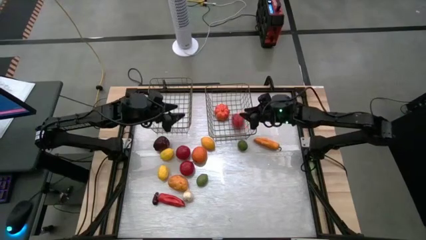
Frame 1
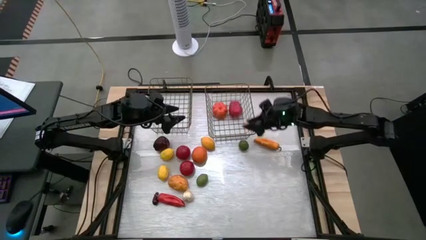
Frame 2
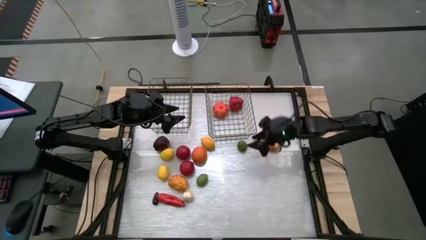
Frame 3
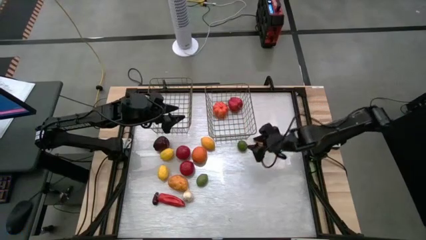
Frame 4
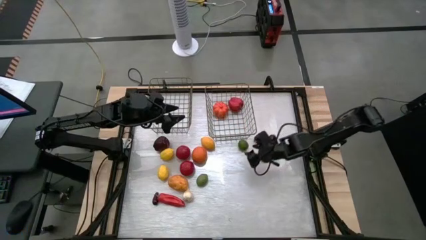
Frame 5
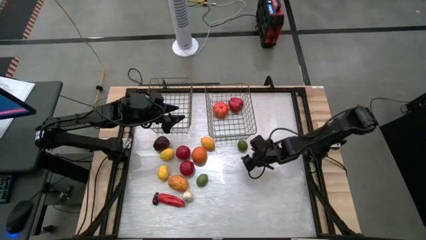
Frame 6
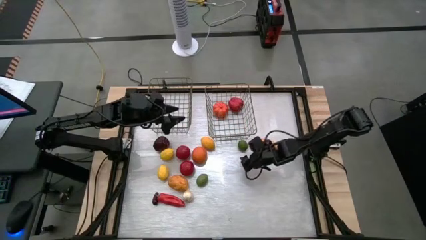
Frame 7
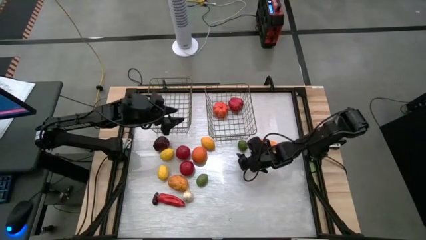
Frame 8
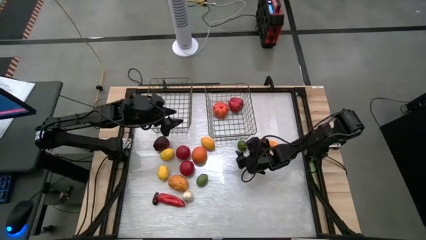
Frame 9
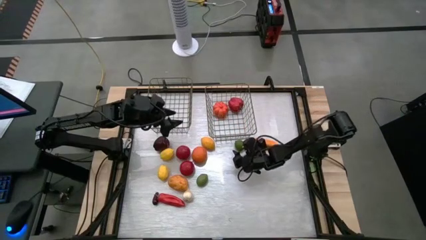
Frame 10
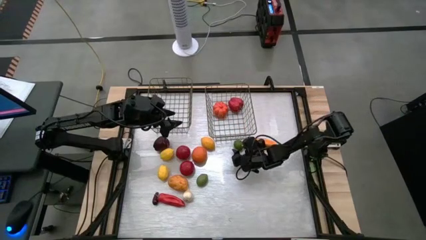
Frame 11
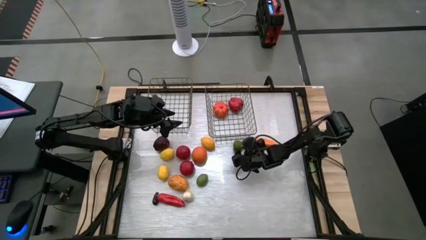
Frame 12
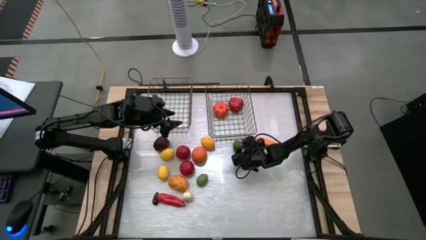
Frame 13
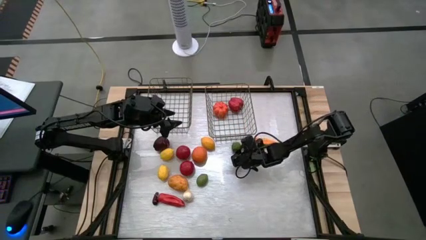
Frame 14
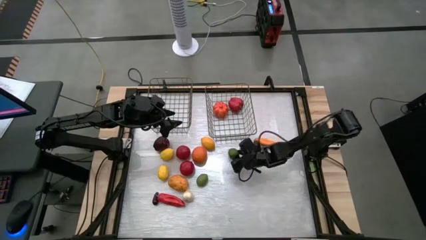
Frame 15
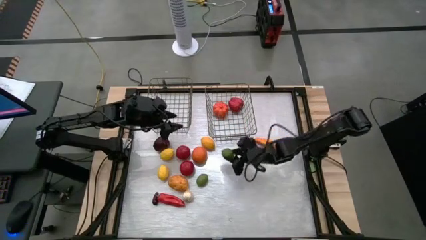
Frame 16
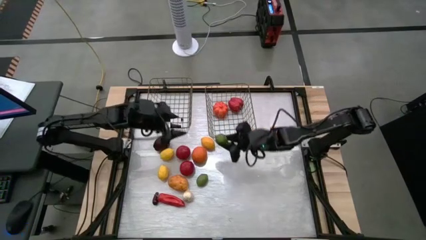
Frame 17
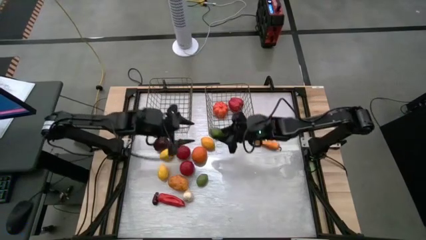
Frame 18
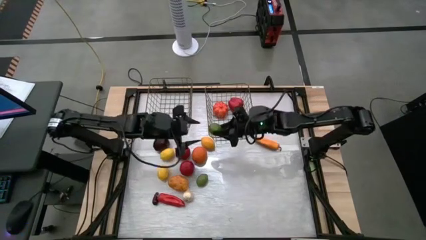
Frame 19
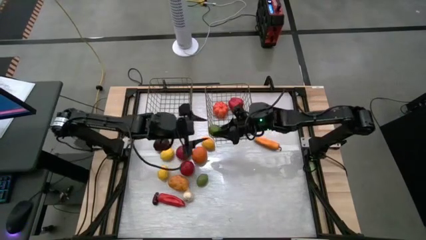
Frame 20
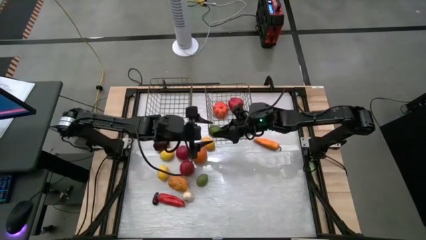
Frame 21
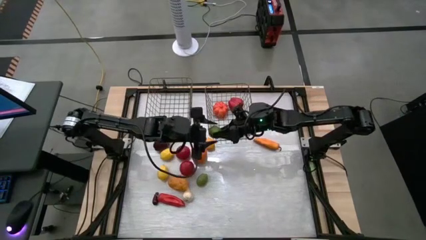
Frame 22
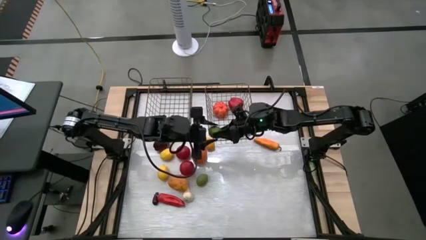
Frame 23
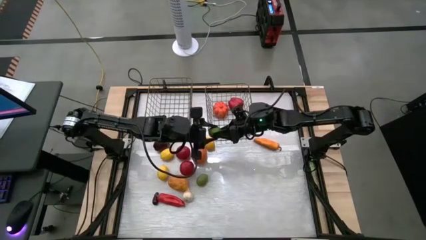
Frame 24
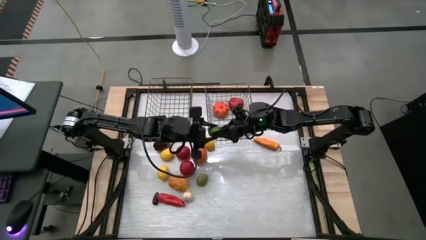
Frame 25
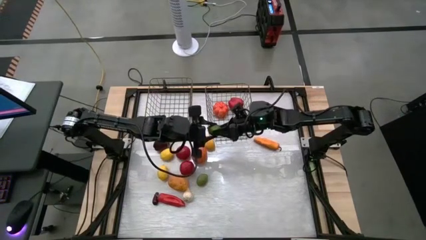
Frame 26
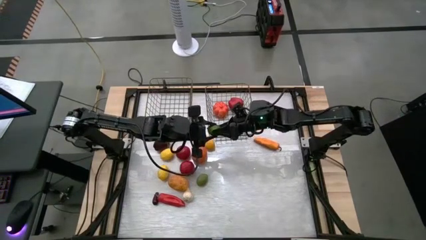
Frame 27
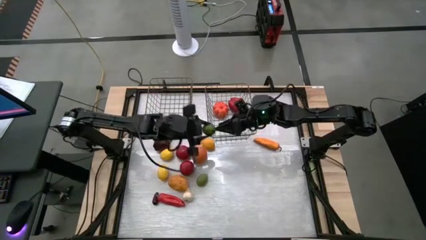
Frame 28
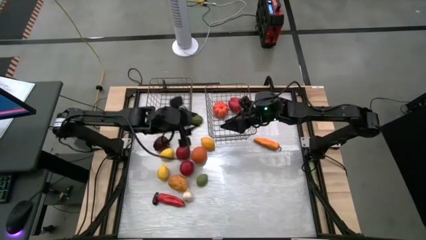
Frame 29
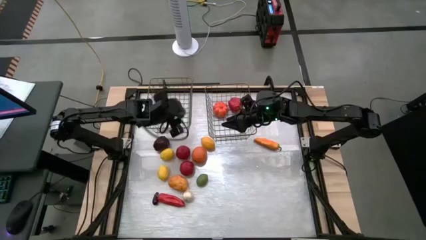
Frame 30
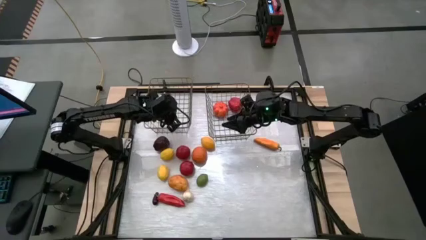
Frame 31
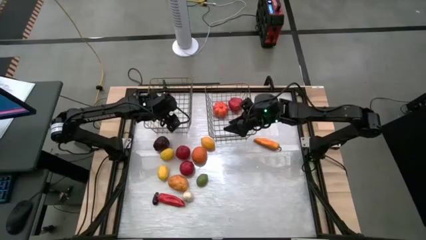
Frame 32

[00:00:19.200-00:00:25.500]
Task: Sort produce into baskets
Put the top right lime into the left wire basket

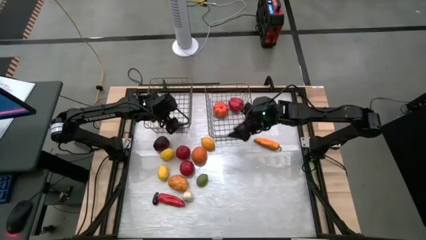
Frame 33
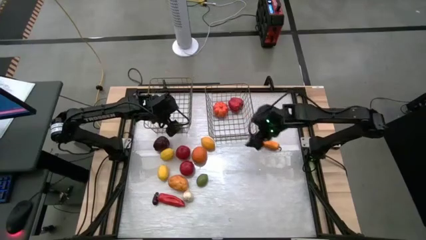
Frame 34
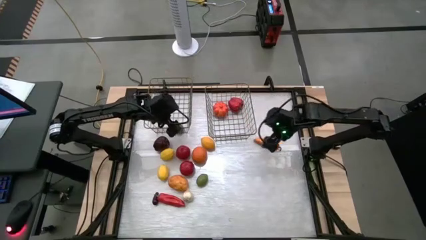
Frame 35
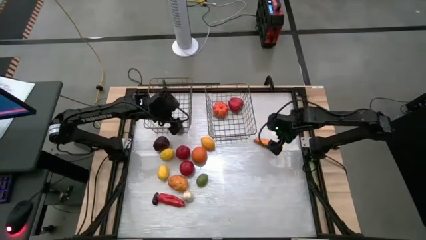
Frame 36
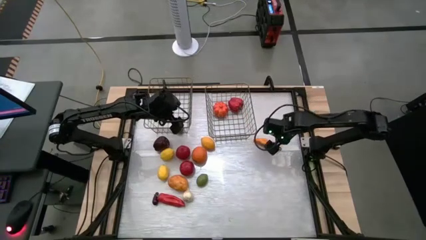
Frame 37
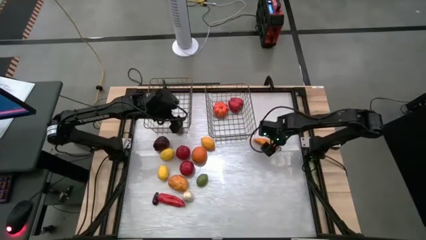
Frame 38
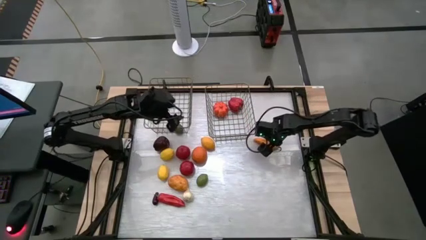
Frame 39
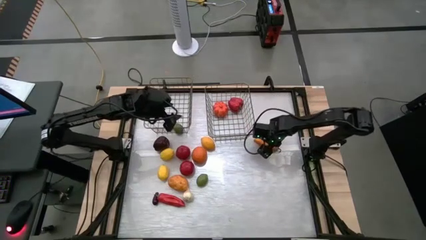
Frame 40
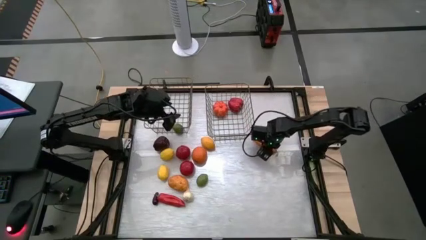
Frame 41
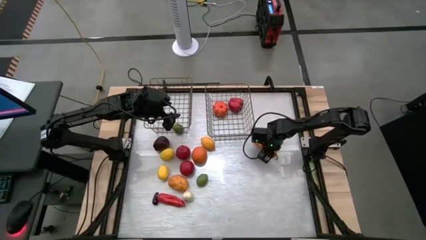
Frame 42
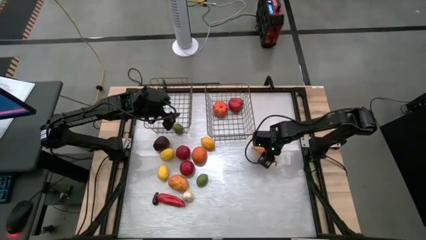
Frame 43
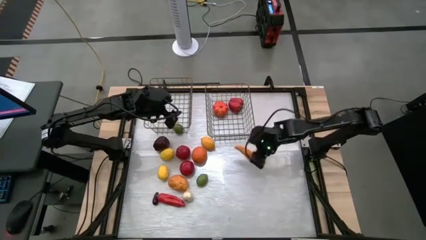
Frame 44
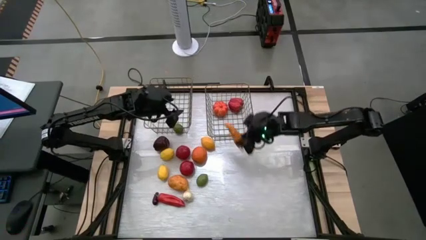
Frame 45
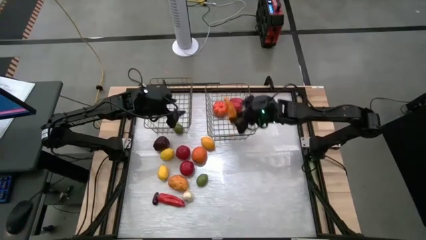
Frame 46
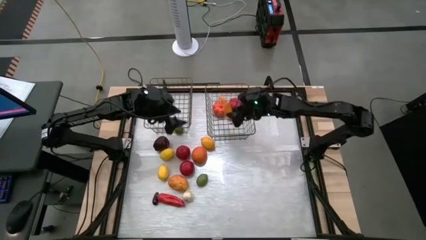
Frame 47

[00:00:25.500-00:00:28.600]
Put the yellow chili pepper into the right wire basket

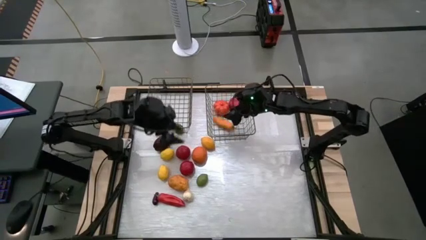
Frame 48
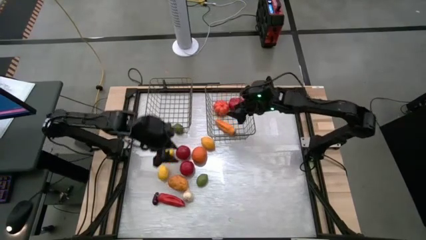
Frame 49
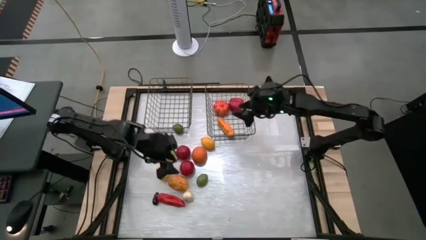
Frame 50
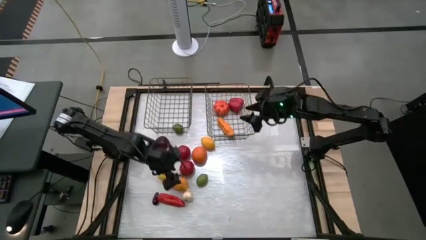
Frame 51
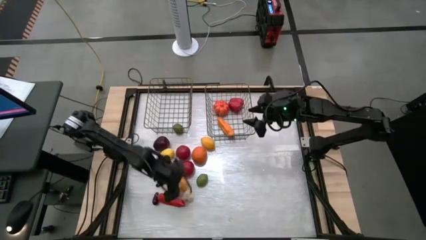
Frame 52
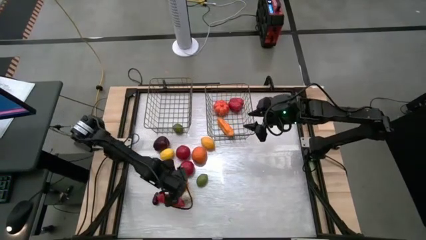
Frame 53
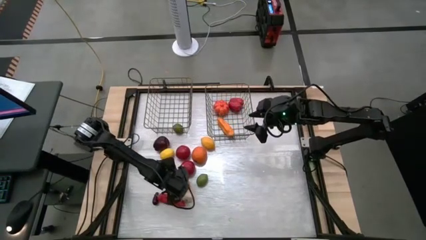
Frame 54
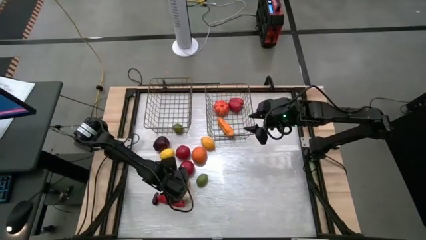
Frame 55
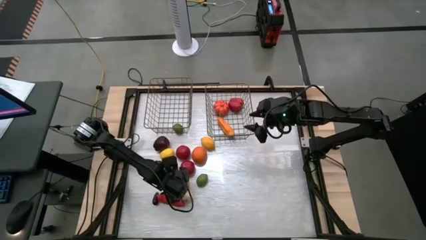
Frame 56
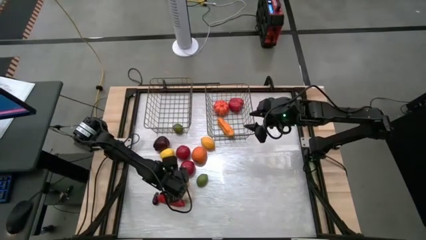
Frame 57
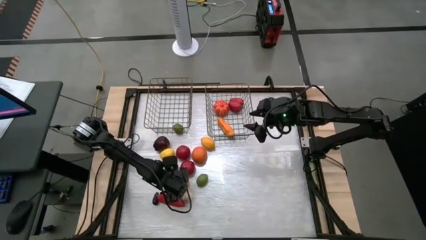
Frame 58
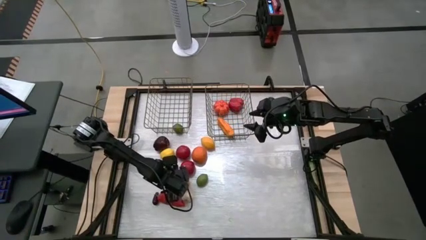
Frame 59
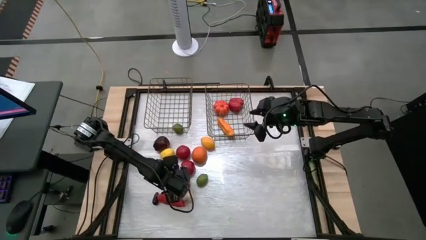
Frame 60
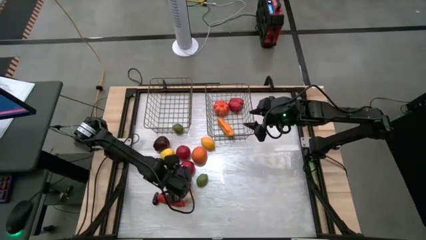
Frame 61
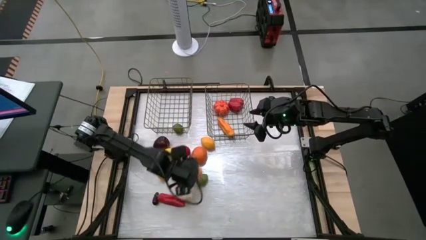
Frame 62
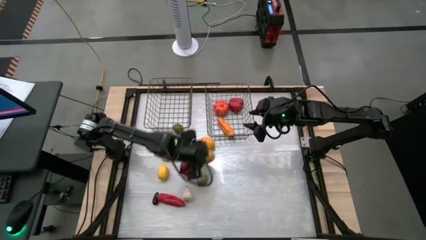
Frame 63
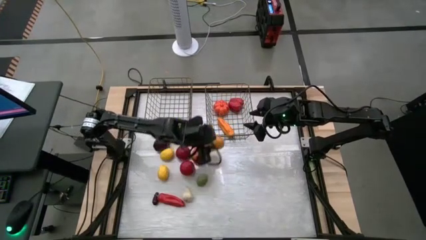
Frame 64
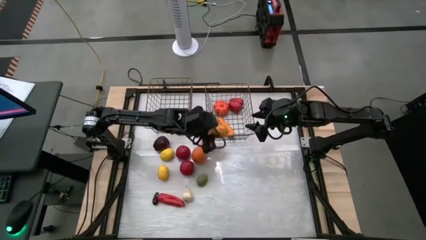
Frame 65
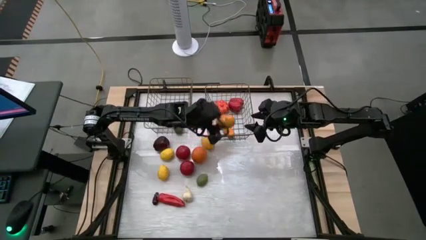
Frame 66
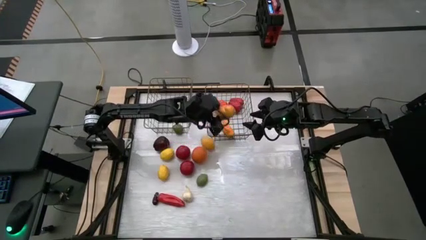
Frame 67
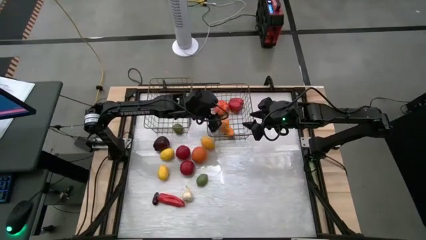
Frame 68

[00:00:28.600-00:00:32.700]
Put the potato into the right wire basket

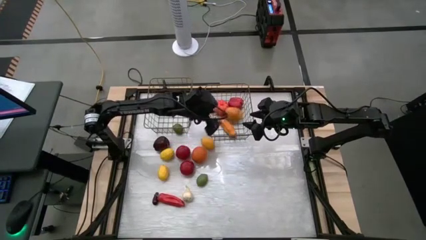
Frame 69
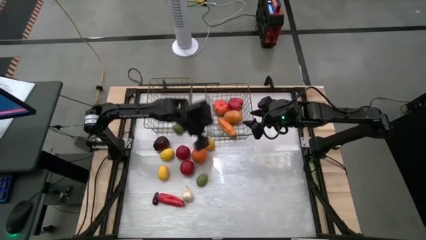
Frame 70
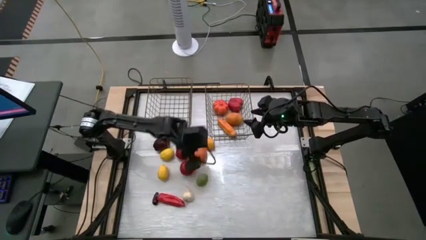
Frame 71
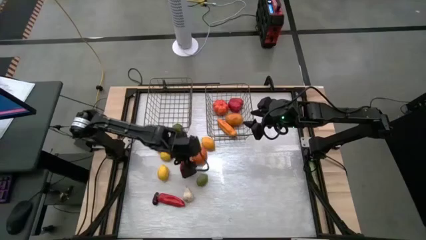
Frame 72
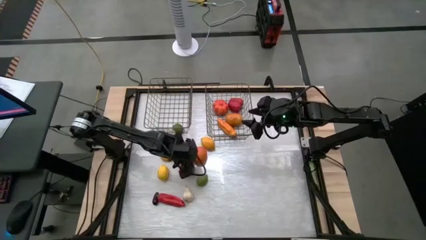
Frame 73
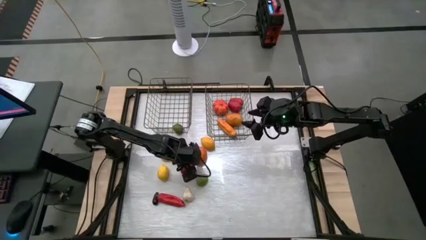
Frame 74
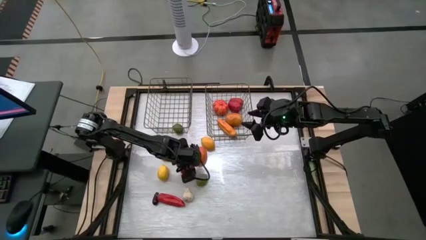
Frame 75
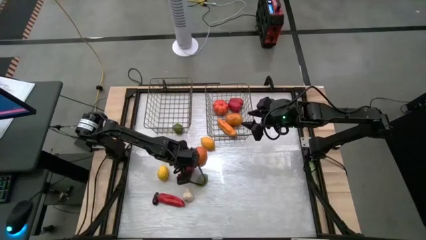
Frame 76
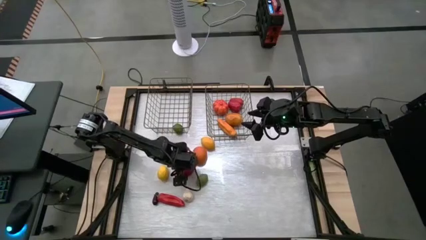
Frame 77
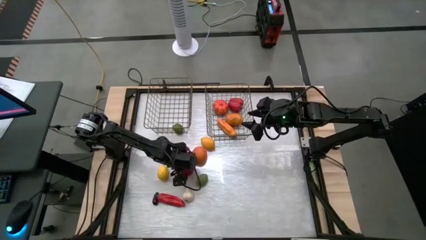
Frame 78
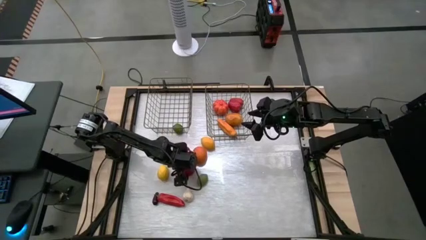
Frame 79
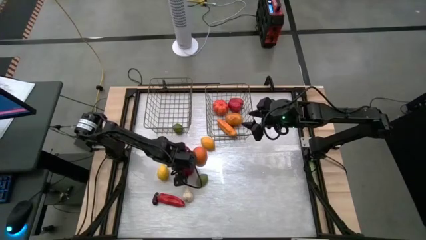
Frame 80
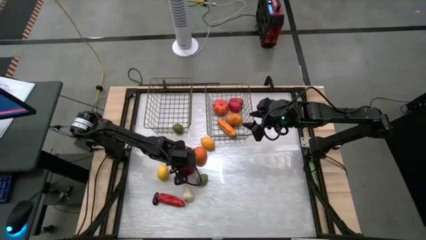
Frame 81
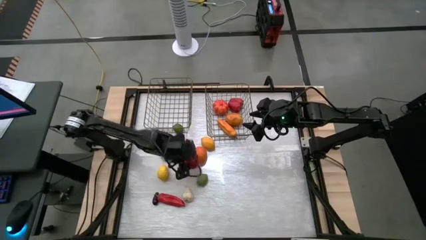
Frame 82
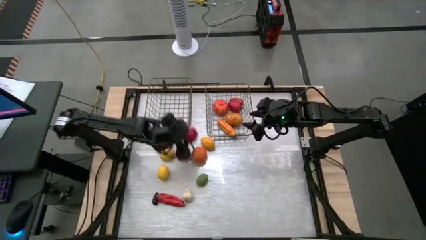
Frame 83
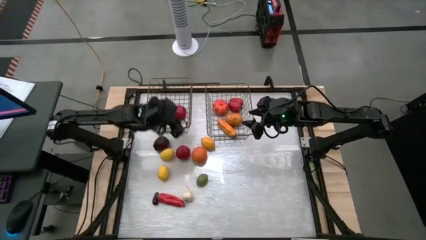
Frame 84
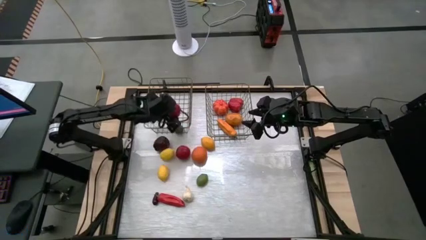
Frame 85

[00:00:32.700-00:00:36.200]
Put the bottom tomato into the left wire basket
